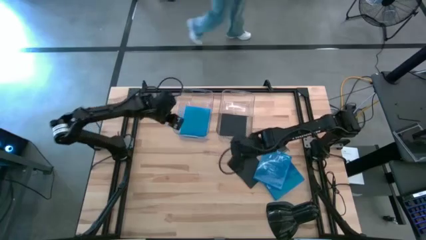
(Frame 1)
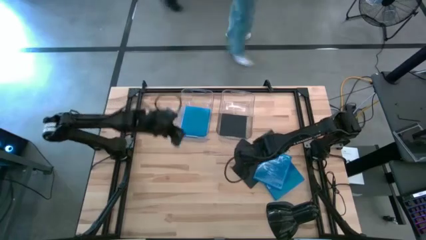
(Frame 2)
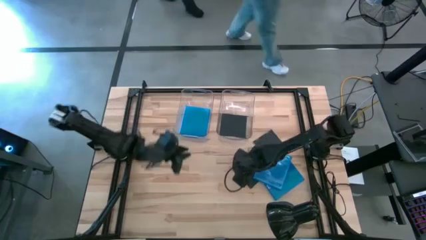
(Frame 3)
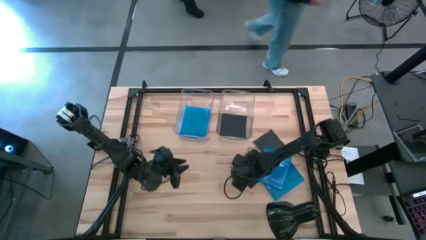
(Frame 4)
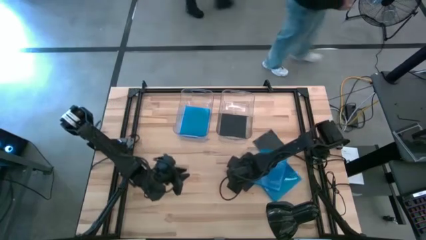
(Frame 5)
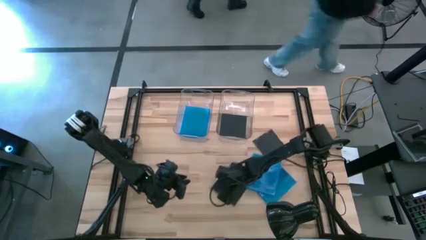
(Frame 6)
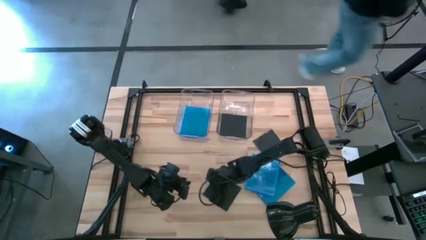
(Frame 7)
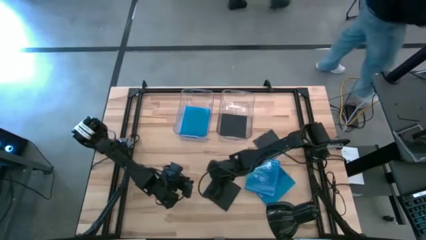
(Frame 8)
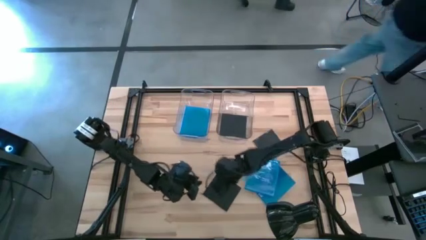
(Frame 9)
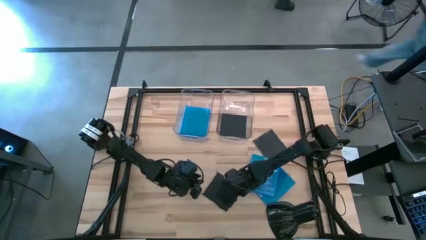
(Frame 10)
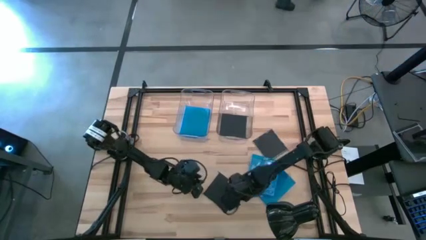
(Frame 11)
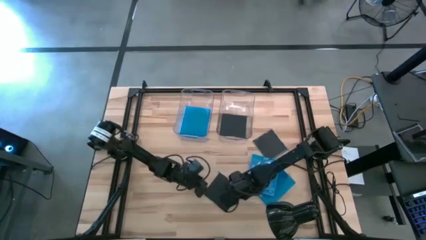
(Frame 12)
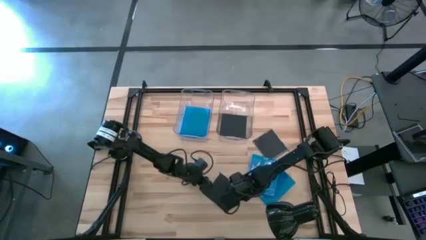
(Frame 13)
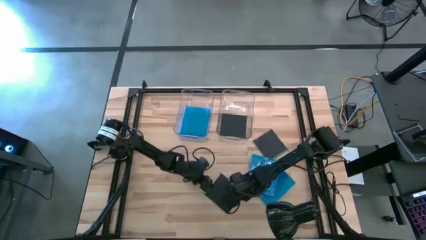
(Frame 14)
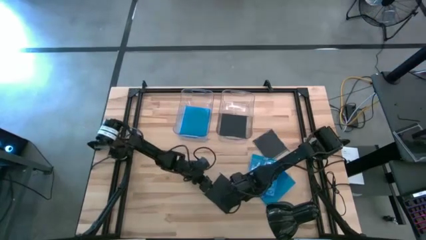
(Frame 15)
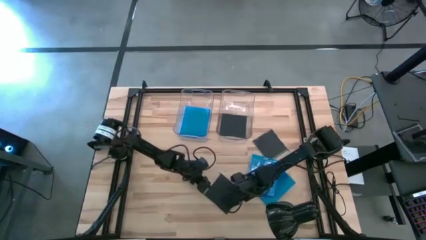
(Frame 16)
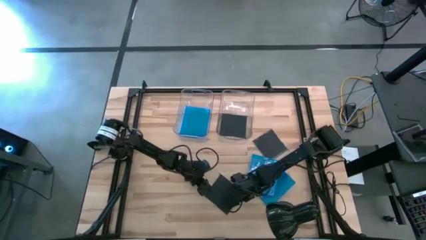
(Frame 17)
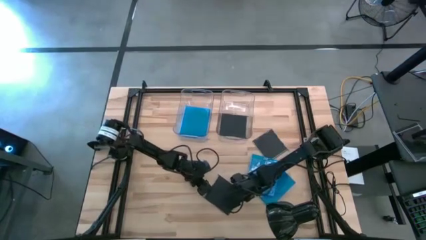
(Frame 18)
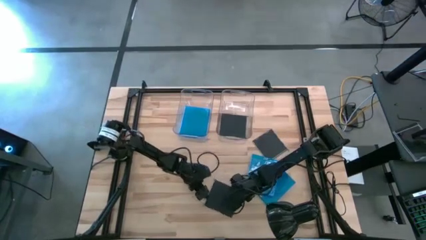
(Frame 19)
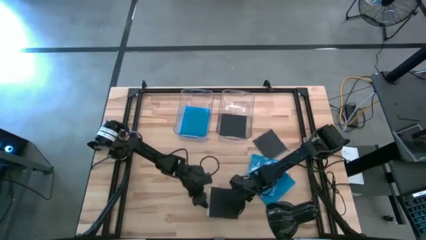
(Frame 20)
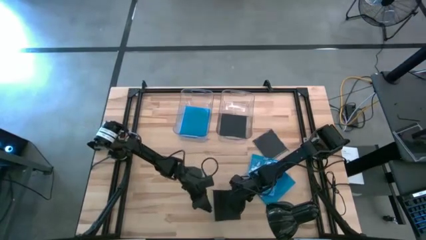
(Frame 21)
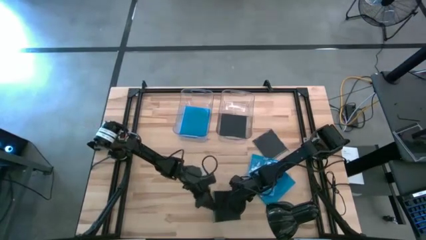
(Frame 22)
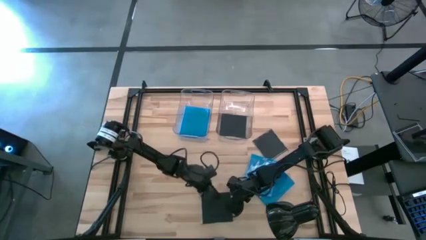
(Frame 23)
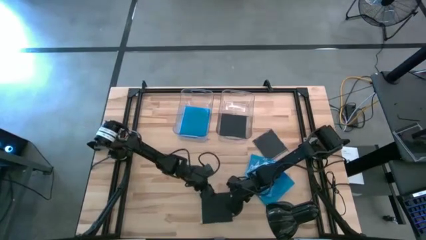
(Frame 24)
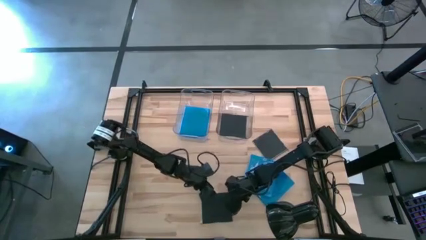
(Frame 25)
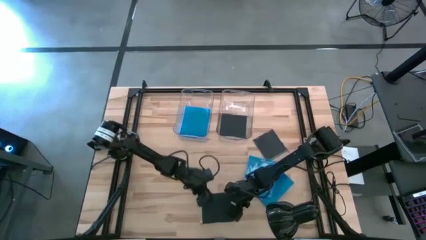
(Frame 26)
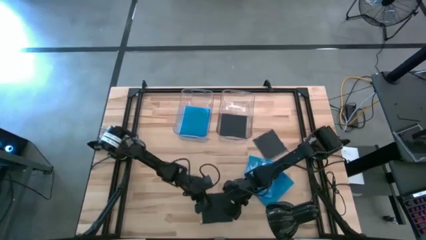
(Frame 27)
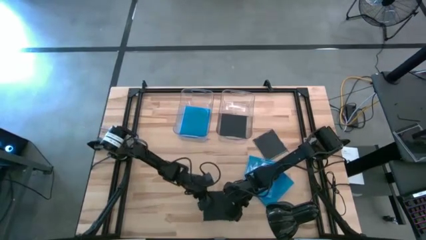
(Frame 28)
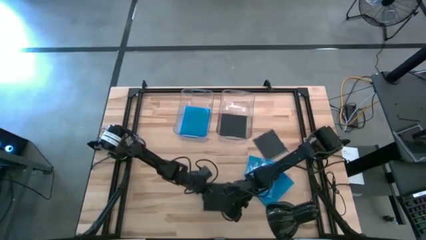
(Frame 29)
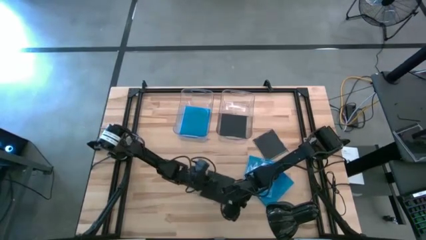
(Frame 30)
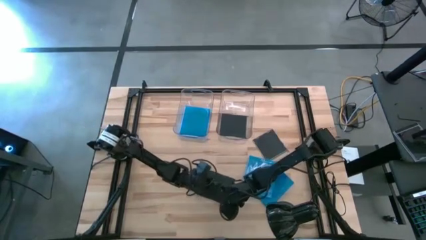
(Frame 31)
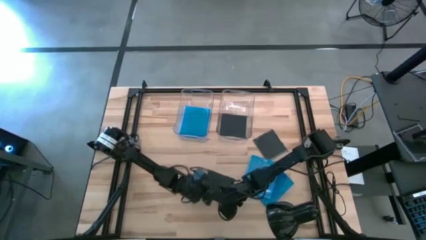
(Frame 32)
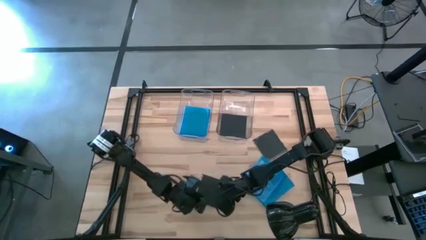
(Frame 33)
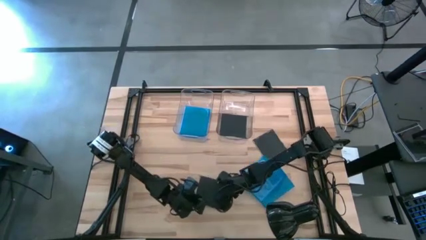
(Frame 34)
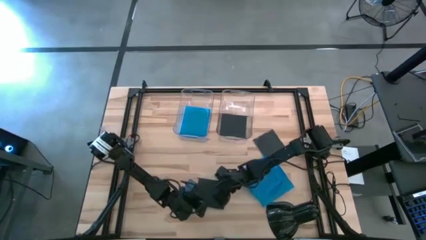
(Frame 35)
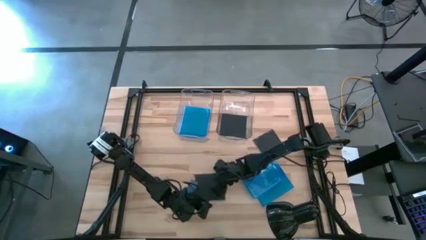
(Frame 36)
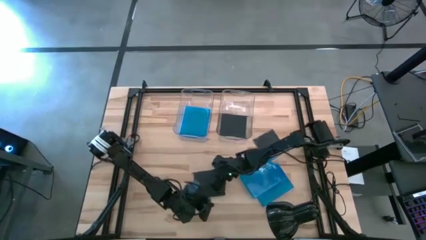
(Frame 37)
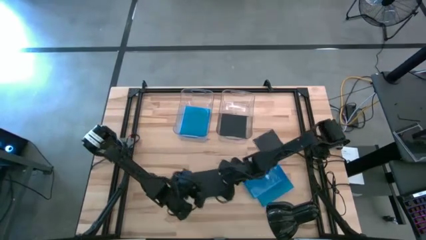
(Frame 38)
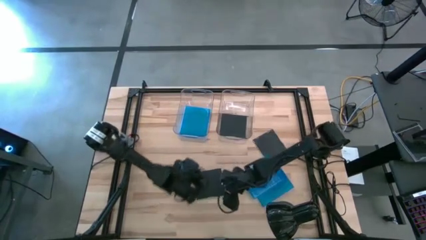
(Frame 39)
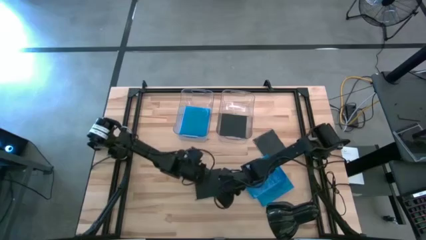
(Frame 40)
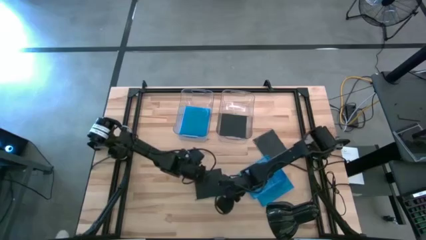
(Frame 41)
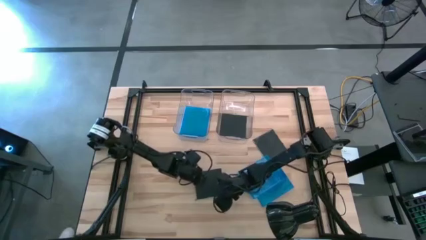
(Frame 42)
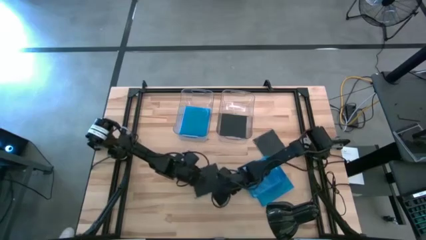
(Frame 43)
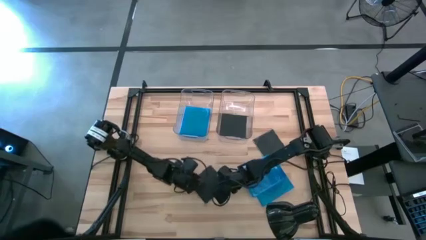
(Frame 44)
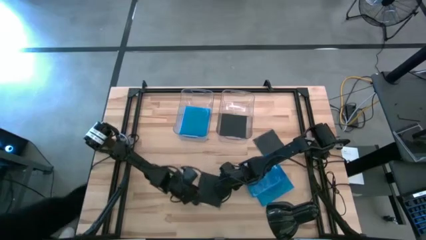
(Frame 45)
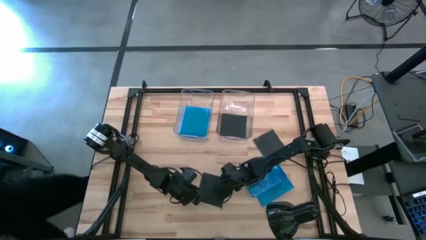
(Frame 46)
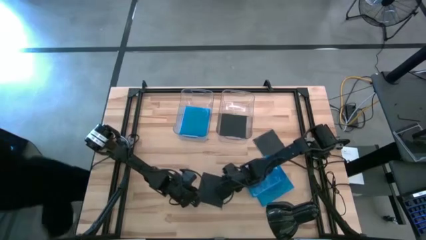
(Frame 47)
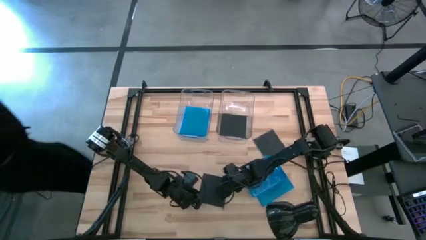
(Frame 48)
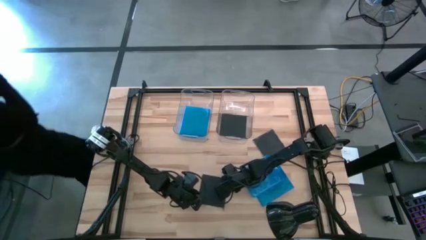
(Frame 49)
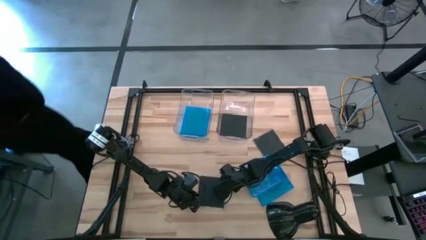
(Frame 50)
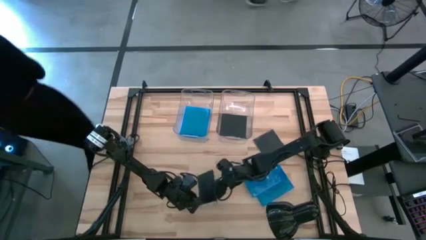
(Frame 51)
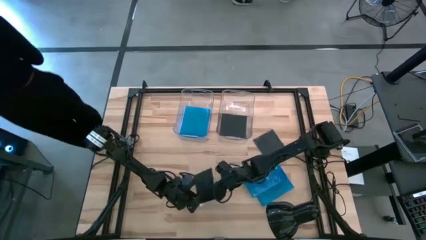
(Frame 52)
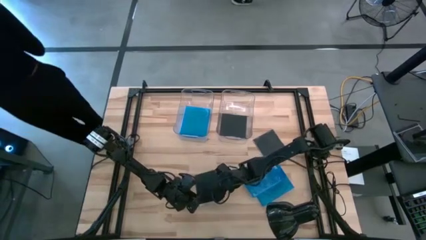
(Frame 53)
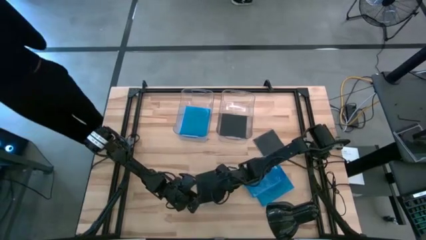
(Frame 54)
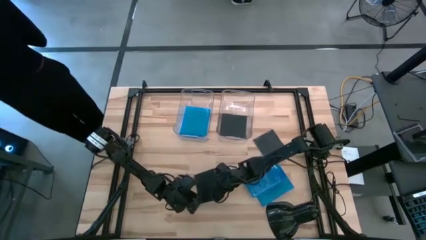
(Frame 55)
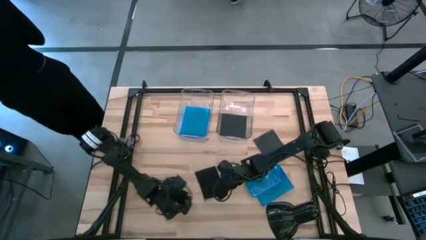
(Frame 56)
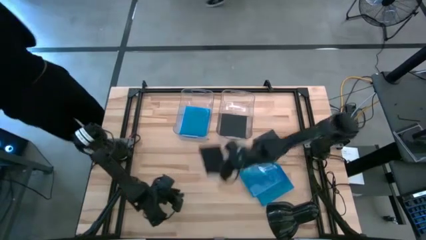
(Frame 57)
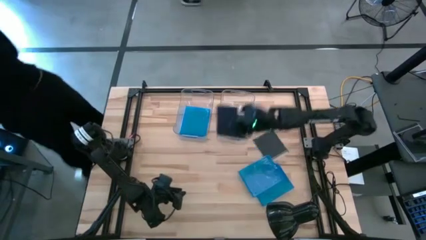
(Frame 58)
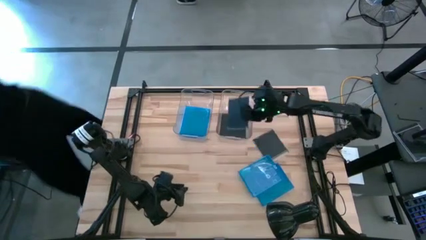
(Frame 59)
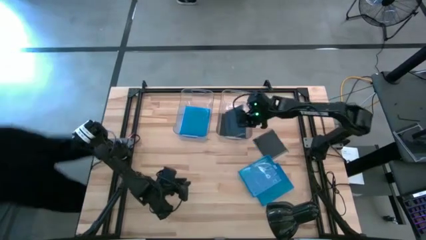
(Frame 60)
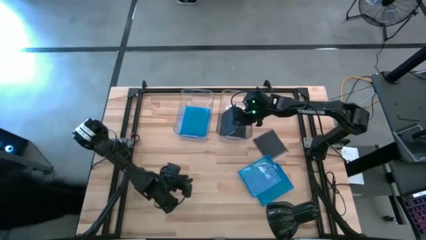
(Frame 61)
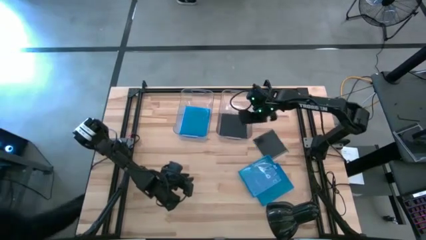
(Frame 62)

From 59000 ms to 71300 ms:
Task: Pick & place jewel cases by type
Put the left black CD case into the right transparent bin

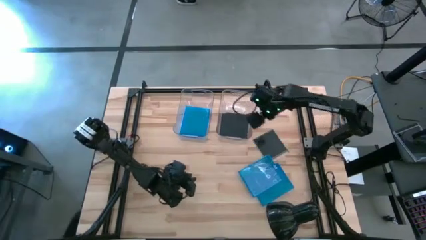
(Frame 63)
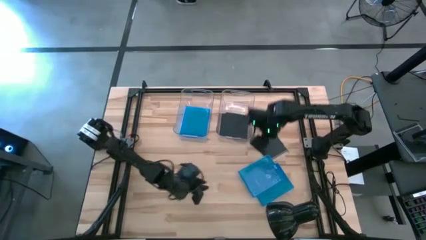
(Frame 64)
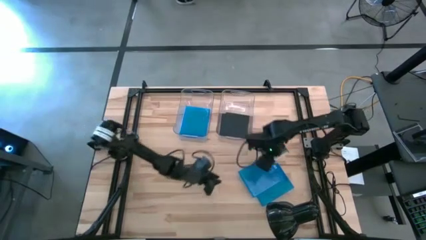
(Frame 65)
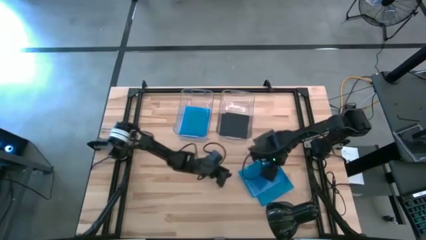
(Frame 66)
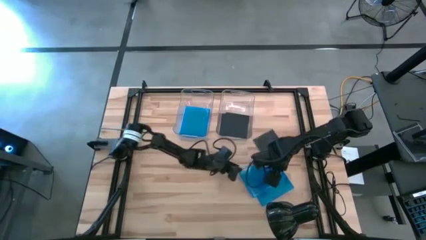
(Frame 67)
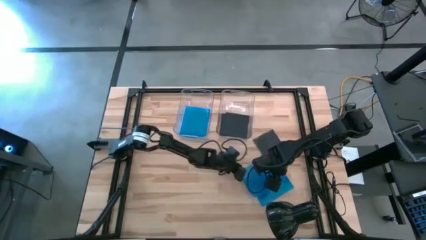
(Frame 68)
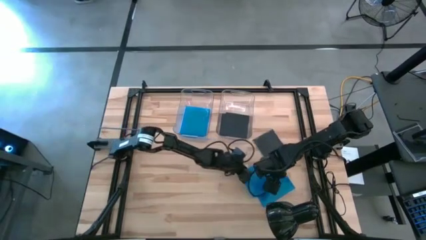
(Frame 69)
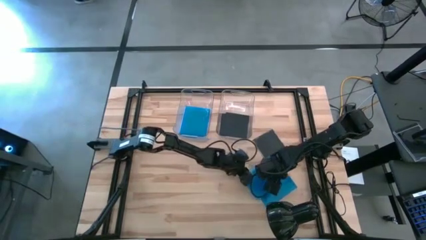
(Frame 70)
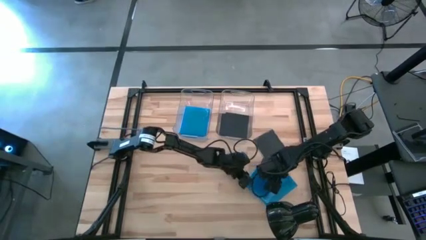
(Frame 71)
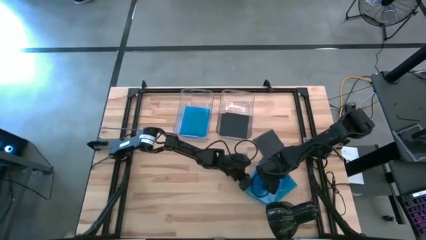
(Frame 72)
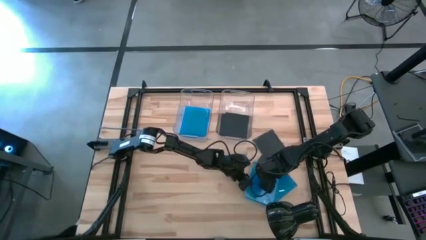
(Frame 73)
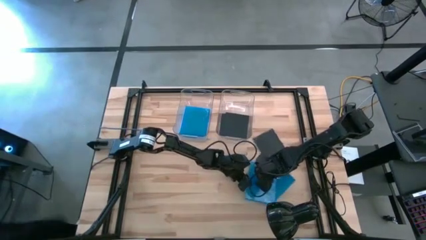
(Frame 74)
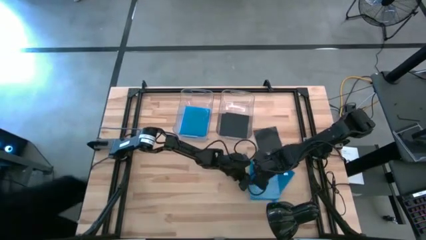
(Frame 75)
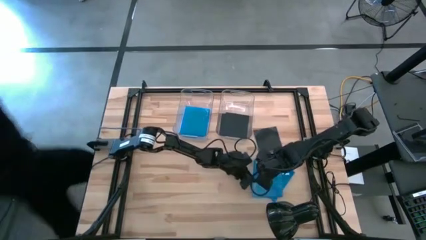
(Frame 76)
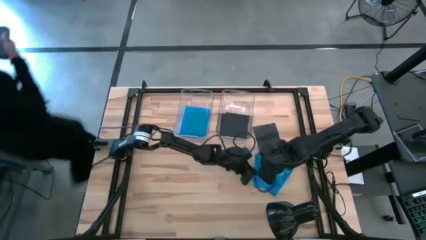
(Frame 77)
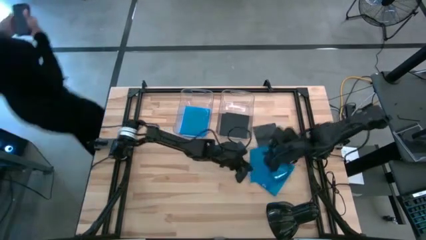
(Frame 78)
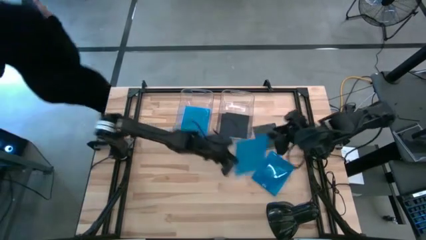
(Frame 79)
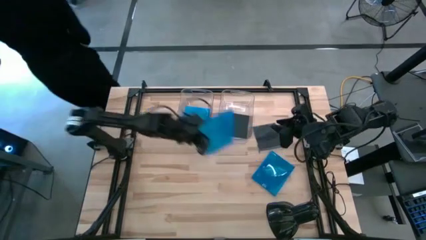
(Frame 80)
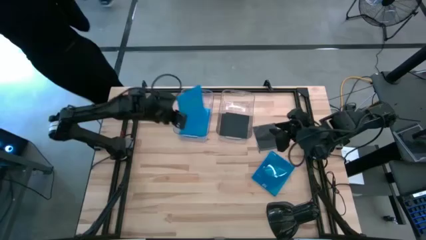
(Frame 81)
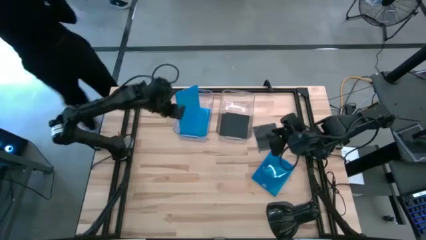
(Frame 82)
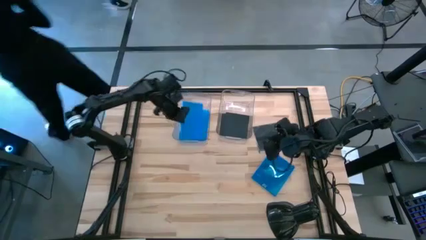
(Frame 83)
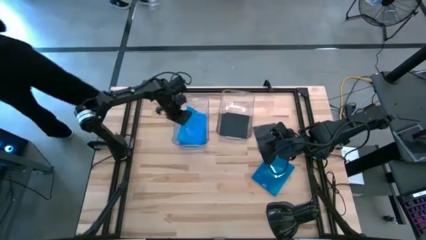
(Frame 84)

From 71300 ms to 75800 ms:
Put the left blue CD case into the left transparent bin

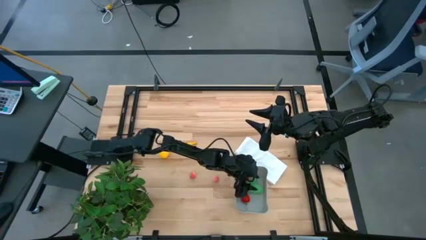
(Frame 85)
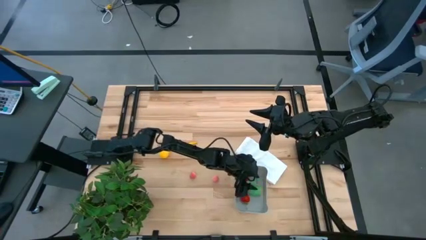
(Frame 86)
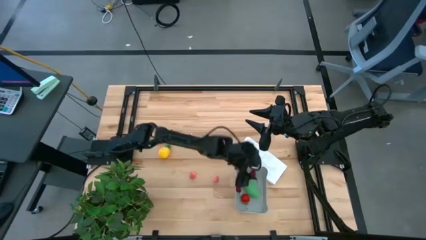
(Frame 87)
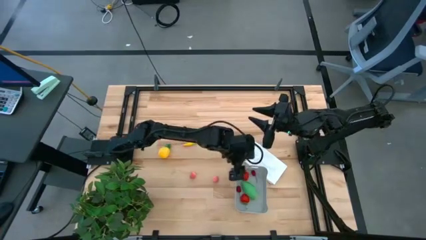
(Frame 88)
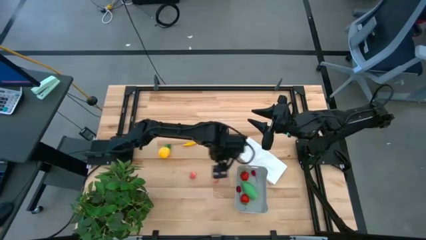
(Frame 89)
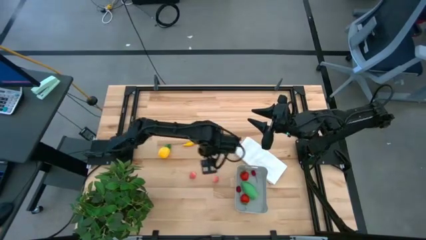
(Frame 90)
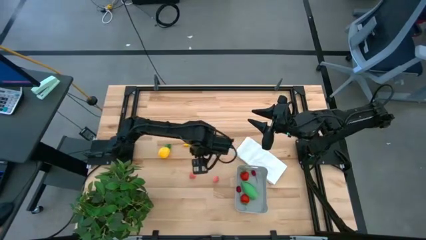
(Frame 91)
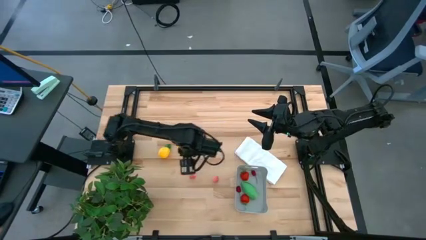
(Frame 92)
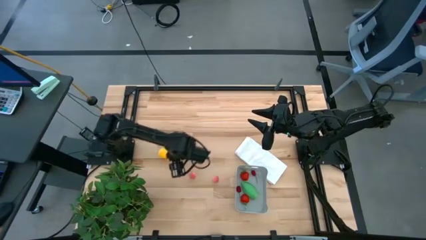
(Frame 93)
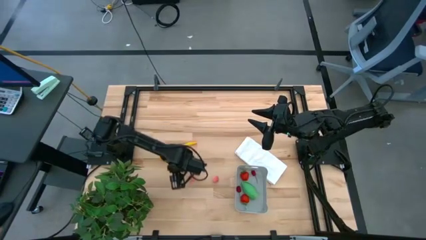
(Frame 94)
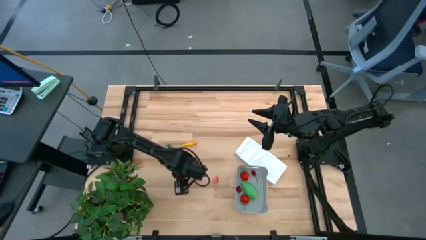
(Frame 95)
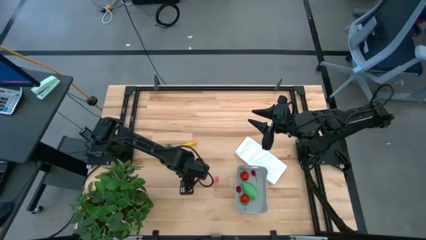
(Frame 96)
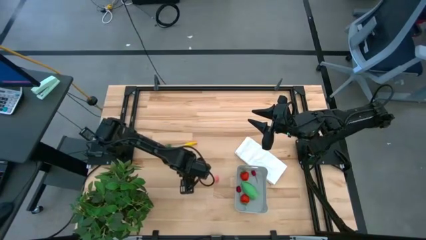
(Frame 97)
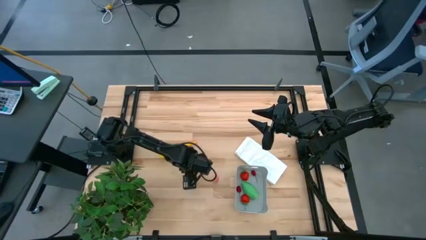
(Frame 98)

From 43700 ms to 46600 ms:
Task: Pick and placing Produce into tupperware
Put the left pink peach into the gray bin
